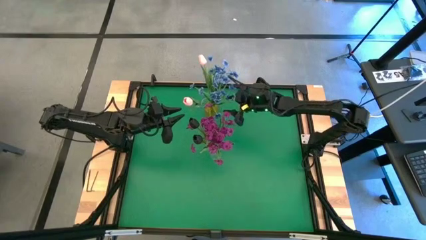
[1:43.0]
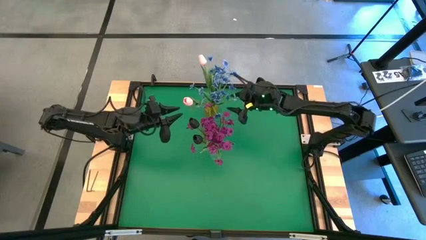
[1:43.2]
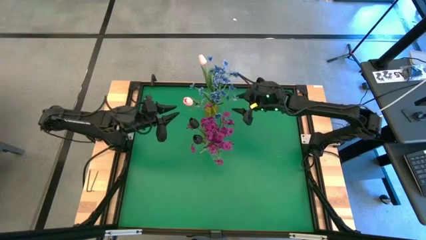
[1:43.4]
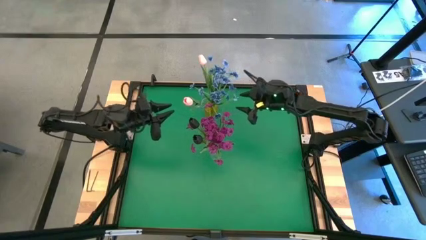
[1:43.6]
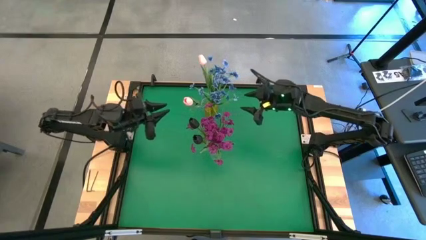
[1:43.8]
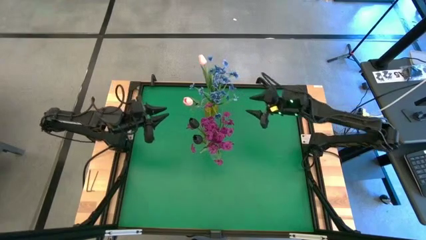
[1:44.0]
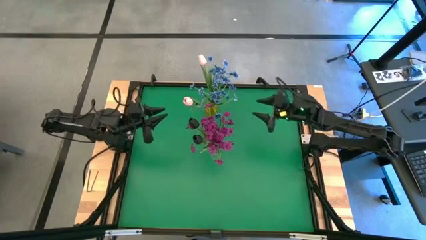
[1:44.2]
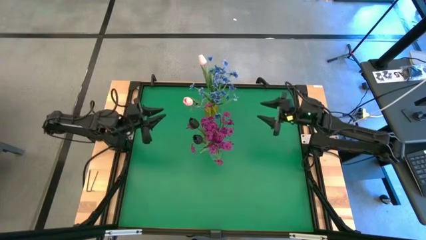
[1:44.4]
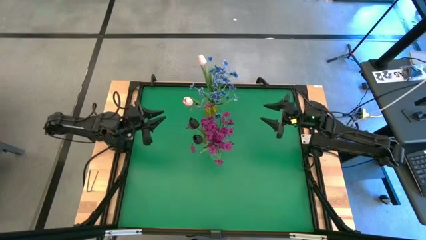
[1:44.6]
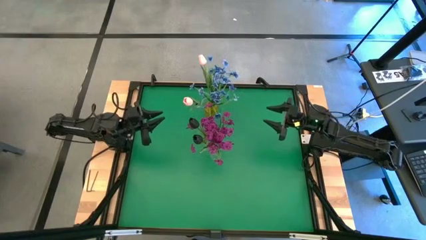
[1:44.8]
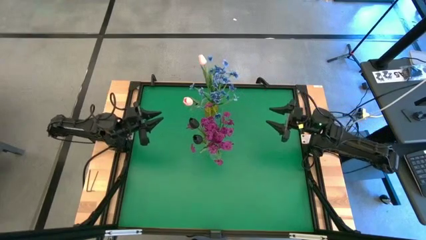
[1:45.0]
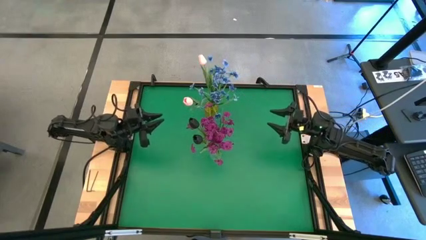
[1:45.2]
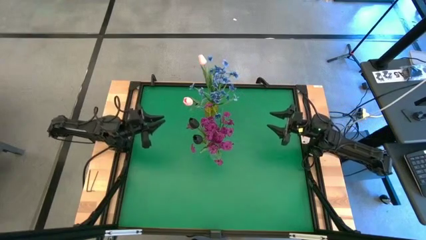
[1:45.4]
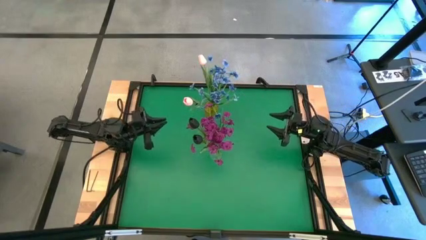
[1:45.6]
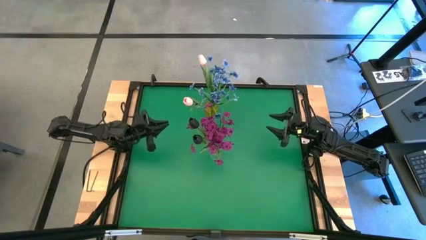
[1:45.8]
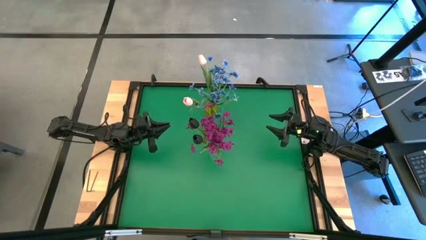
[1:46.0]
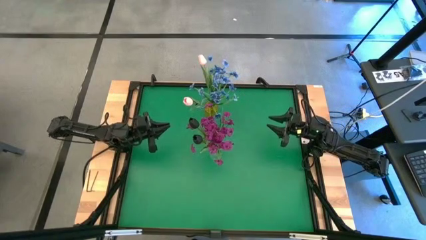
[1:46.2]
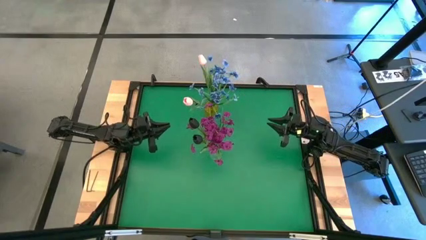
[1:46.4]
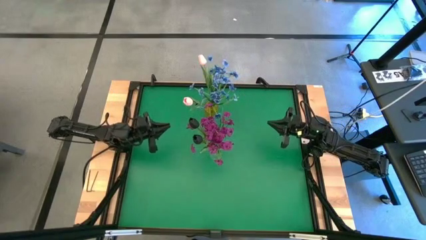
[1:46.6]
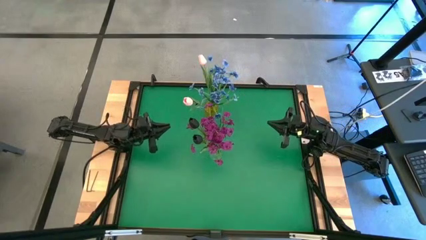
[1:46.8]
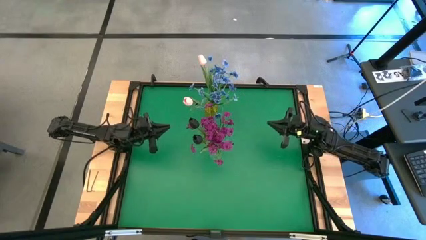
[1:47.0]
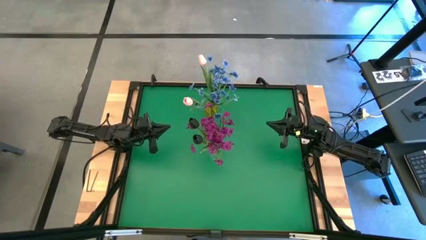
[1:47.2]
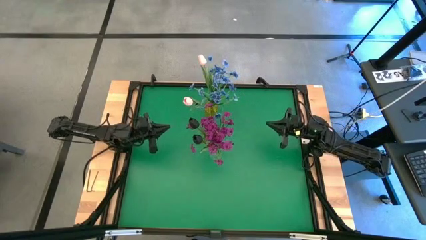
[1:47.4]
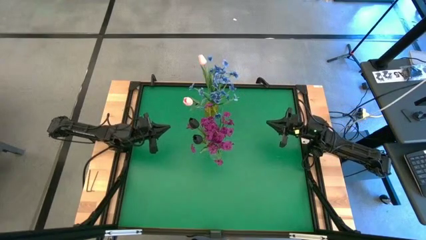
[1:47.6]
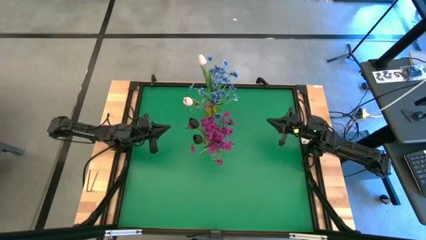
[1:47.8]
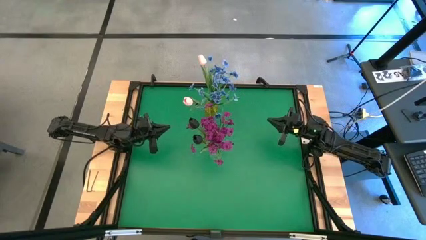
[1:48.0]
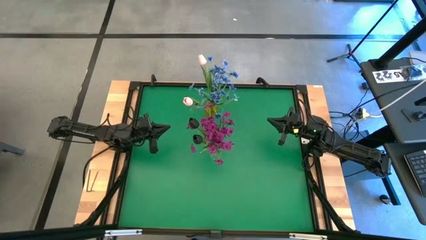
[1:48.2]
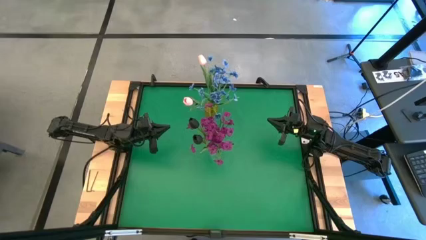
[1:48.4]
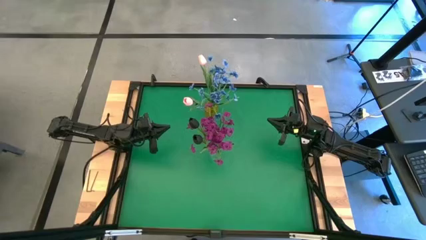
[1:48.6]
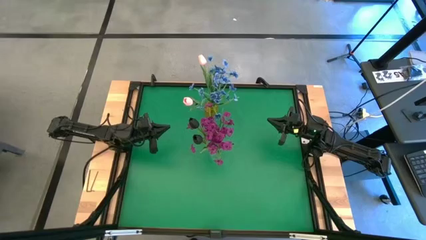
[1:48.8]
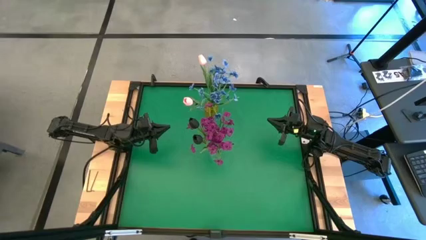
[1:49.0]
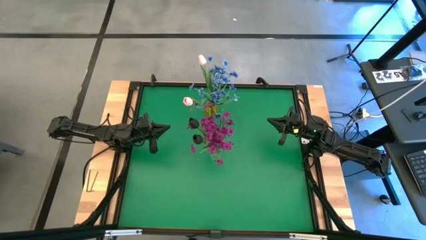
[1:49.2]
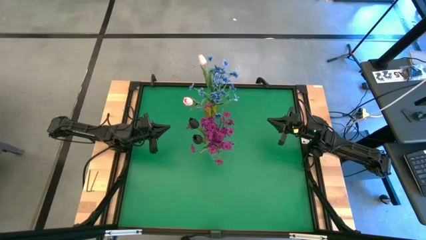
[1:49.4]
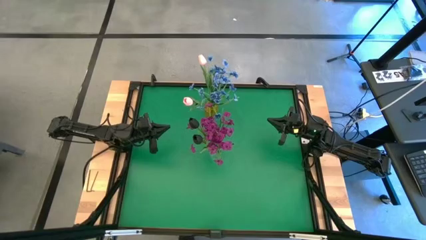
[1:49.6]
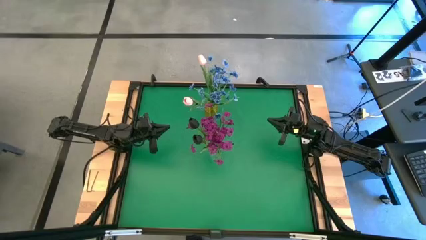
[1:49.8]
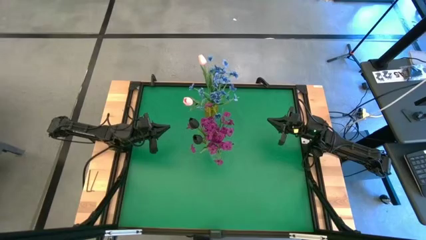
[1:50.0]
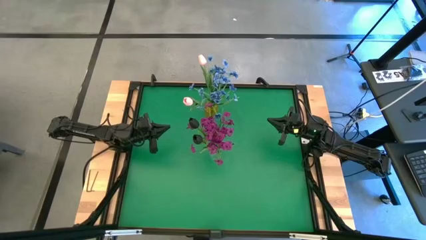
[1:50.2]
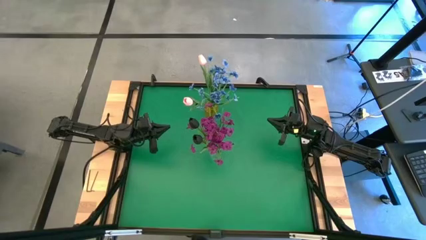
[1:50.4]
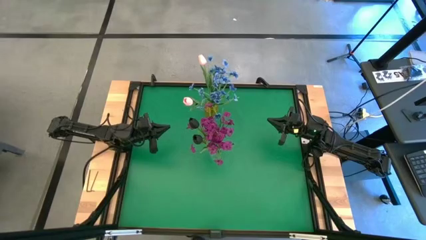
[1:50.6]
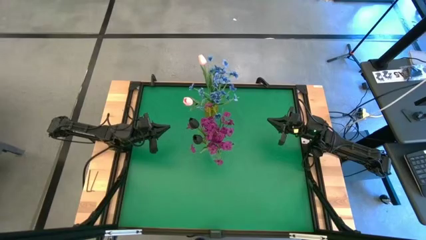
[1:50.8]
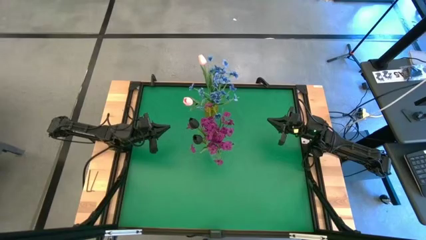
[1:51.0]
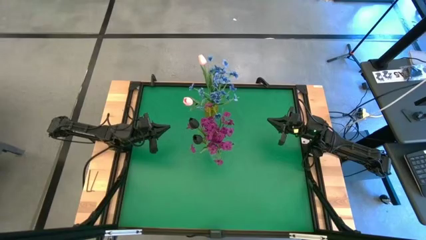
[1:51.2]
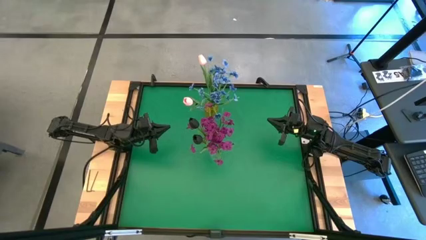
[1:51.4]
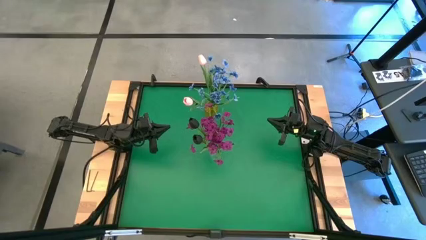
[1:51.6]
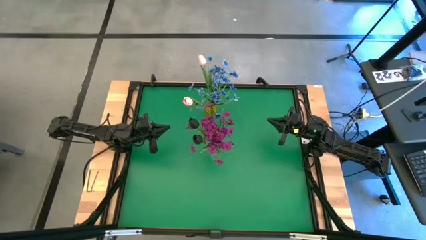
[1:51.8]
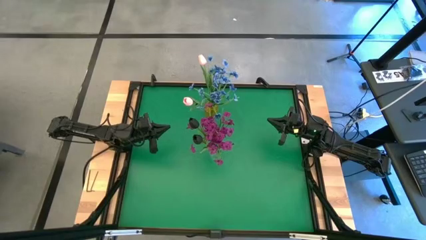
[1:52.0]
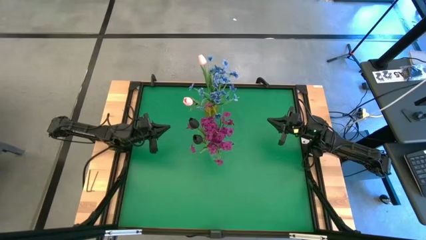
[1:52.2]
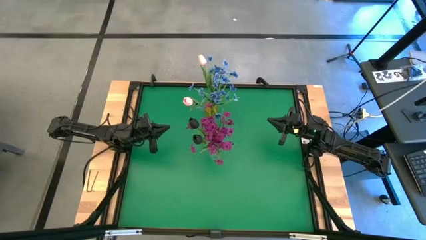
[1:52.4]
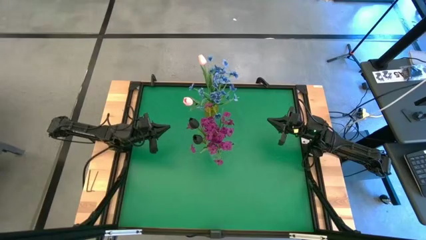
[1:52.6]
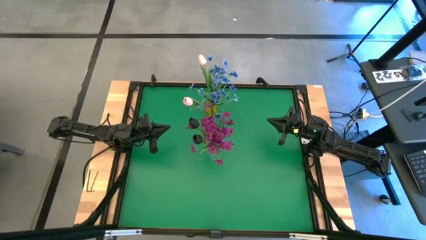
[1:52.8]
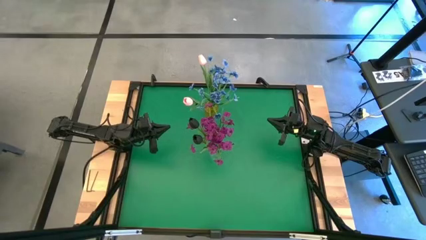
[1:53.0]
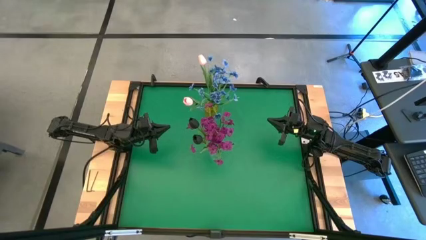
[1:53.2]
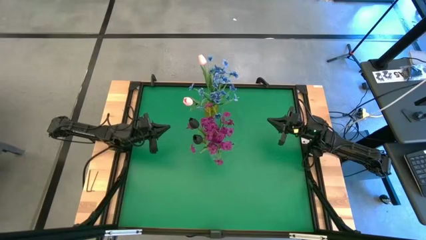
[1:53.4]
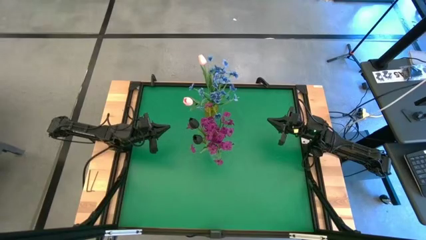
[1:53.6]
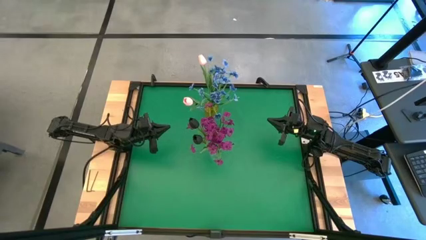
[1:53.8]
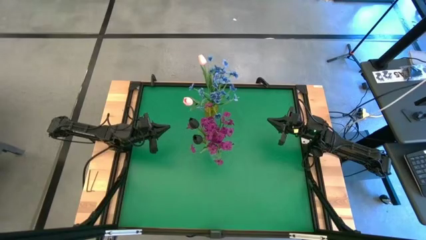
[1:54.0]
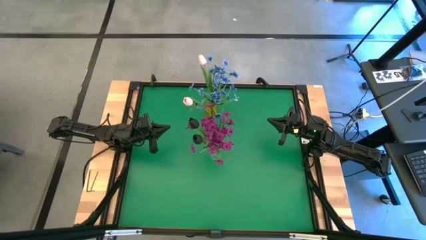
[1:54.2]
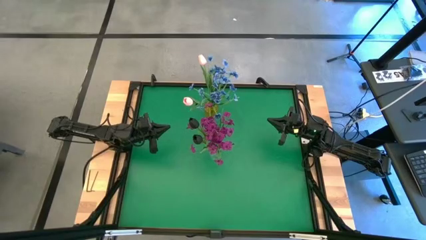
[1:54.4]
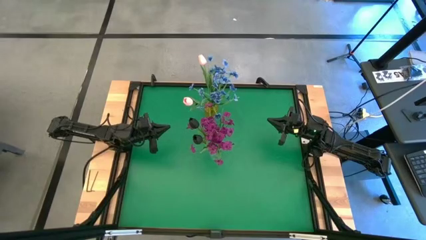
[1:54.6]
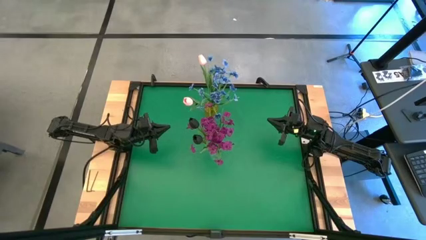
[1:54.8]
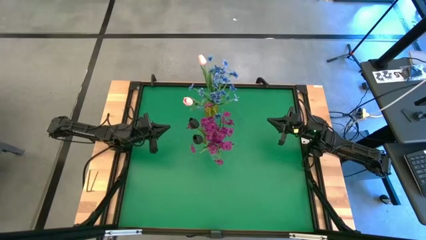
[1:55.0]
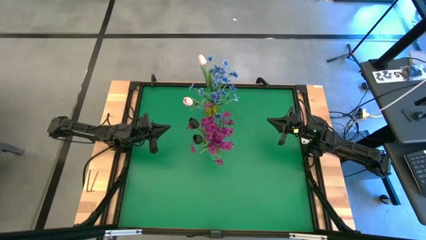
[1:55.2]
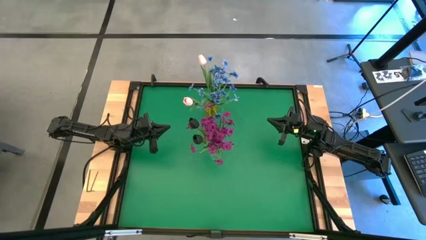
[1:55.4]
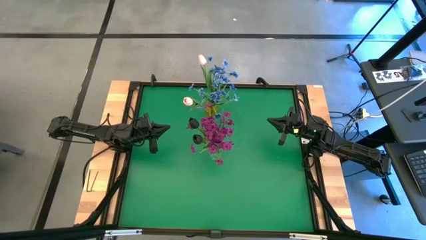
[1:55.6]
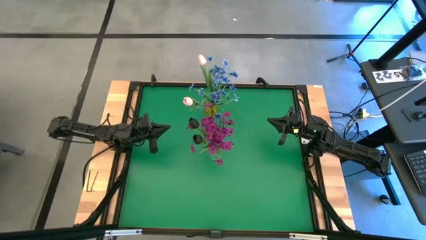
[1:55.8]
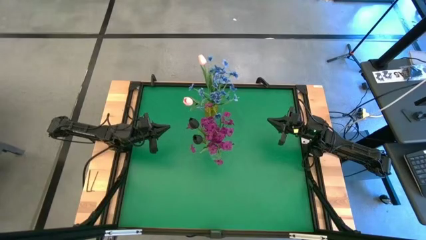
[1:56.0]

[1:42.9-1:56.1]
Task: Sort flowers into vase by color
Return to Home Position
